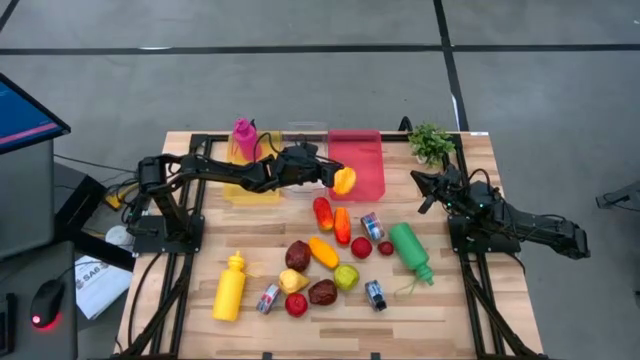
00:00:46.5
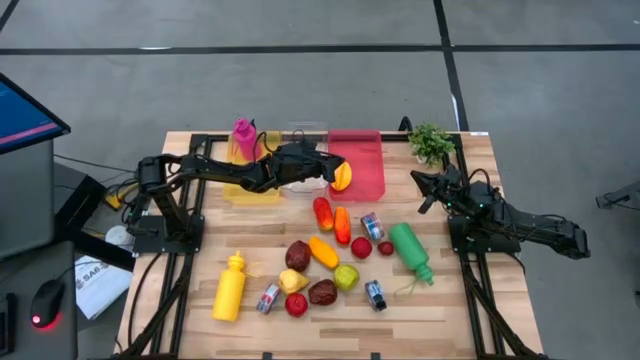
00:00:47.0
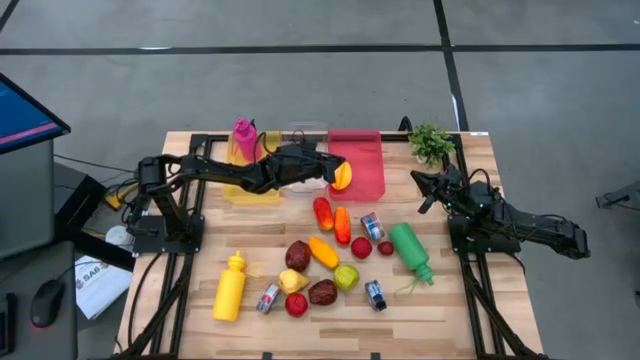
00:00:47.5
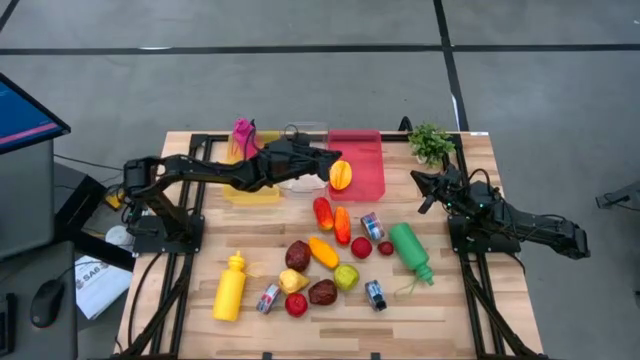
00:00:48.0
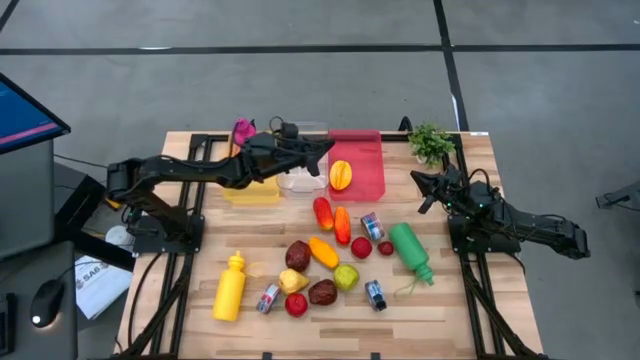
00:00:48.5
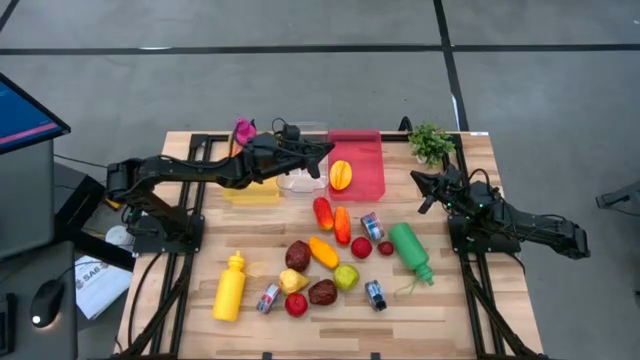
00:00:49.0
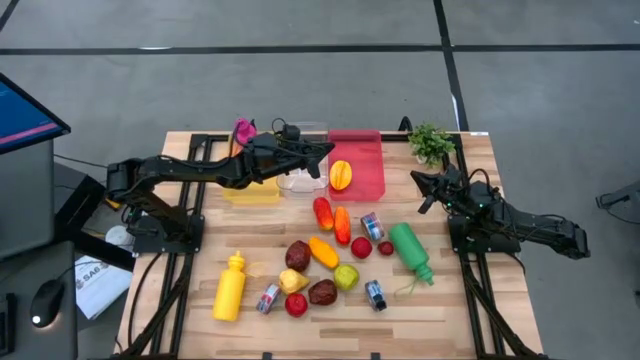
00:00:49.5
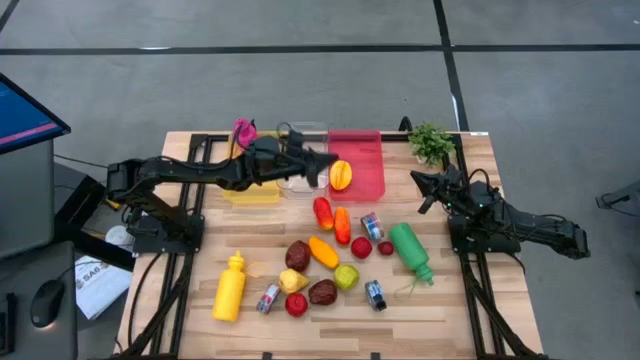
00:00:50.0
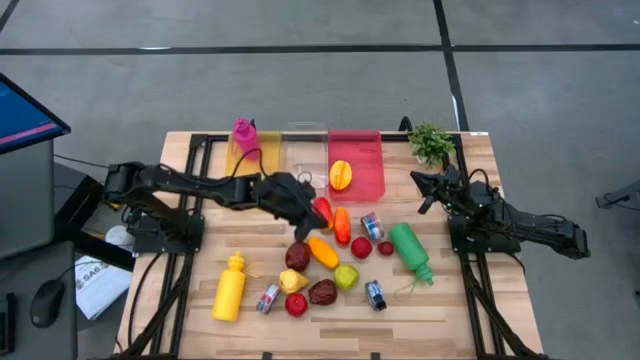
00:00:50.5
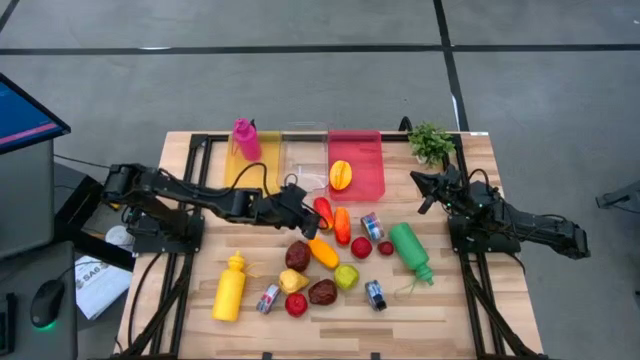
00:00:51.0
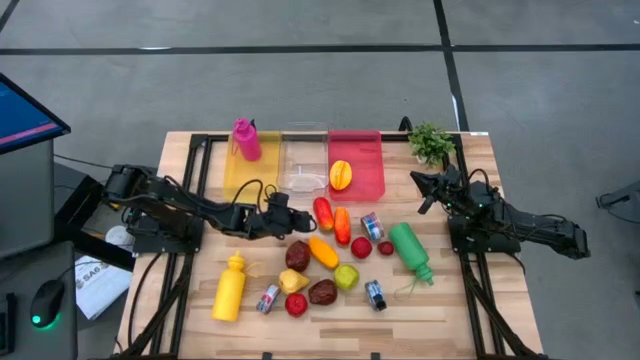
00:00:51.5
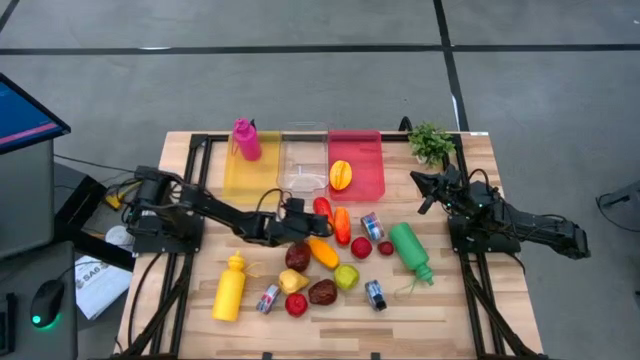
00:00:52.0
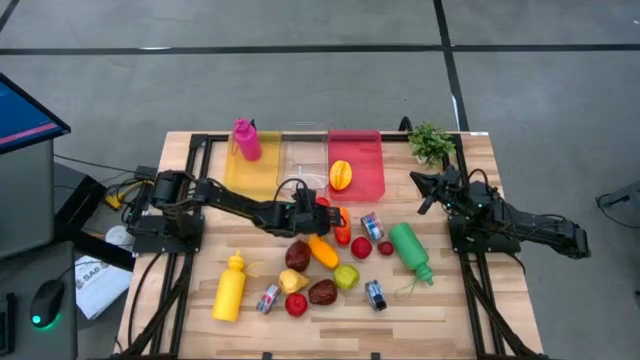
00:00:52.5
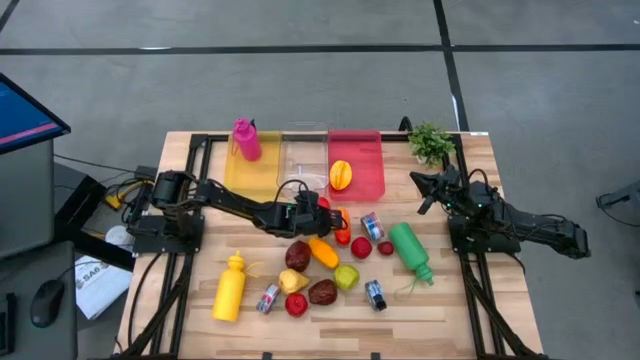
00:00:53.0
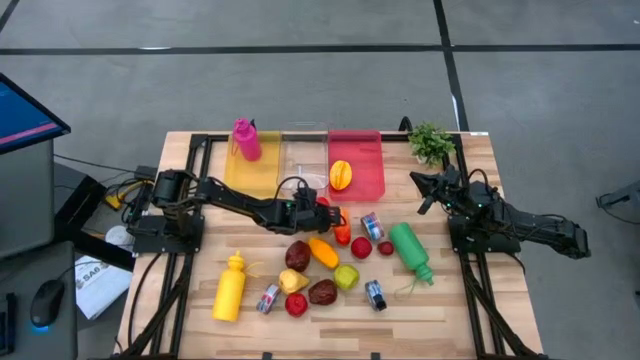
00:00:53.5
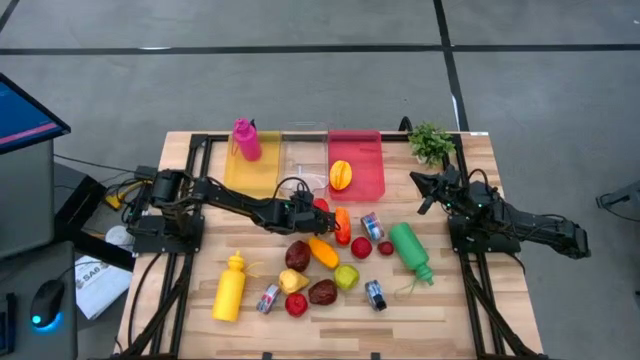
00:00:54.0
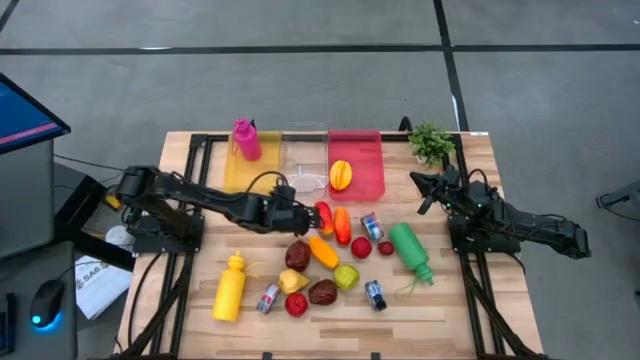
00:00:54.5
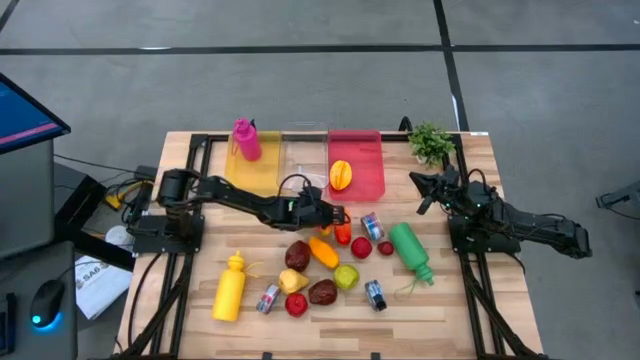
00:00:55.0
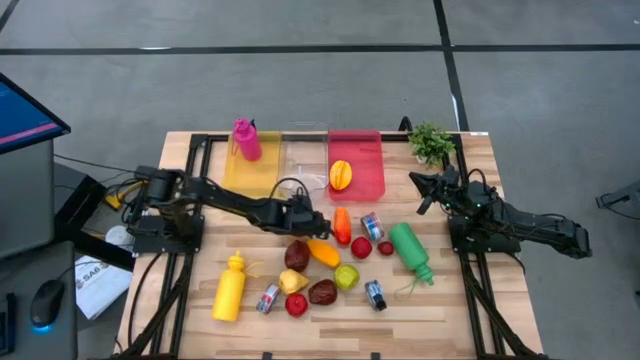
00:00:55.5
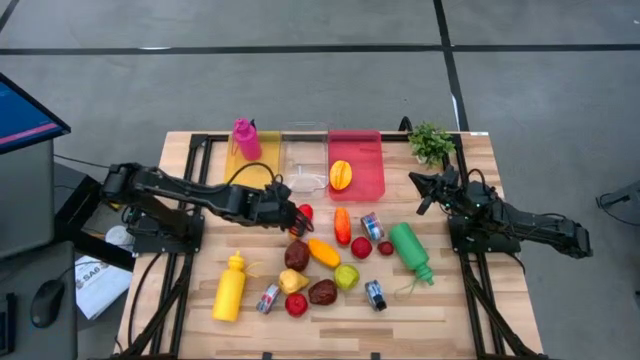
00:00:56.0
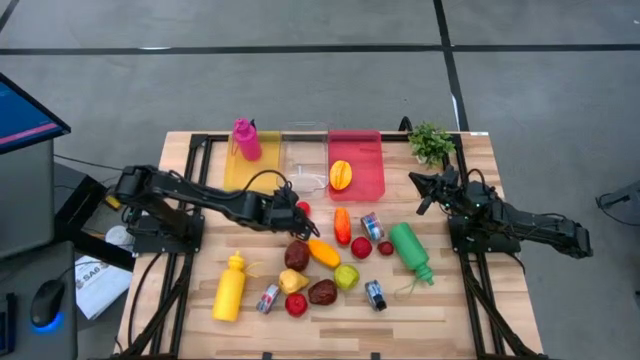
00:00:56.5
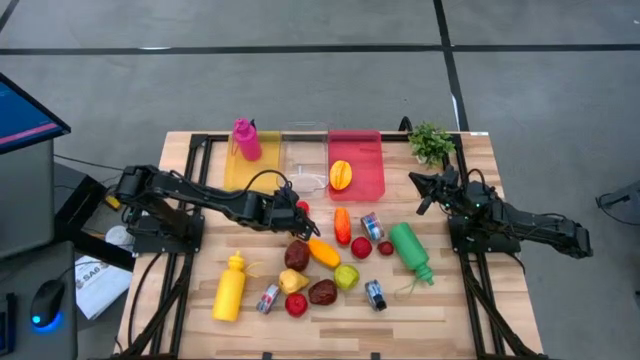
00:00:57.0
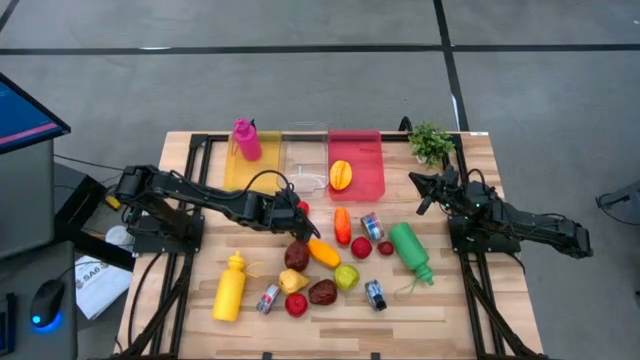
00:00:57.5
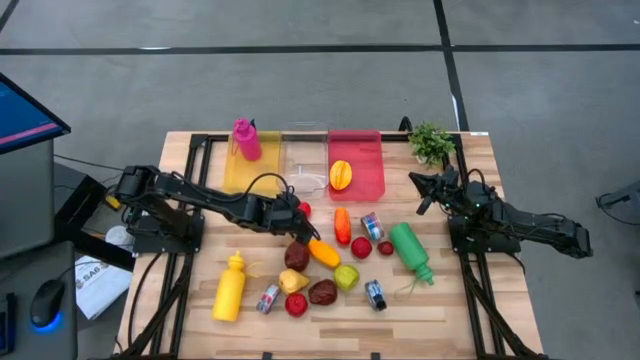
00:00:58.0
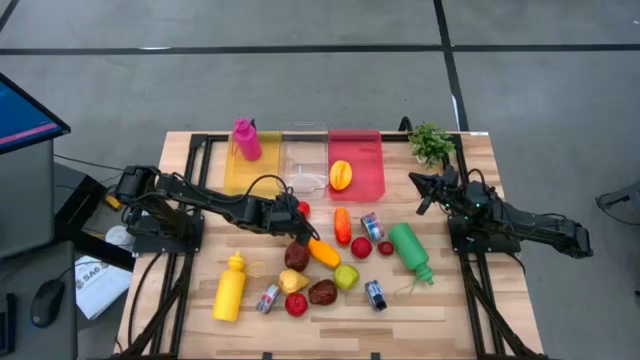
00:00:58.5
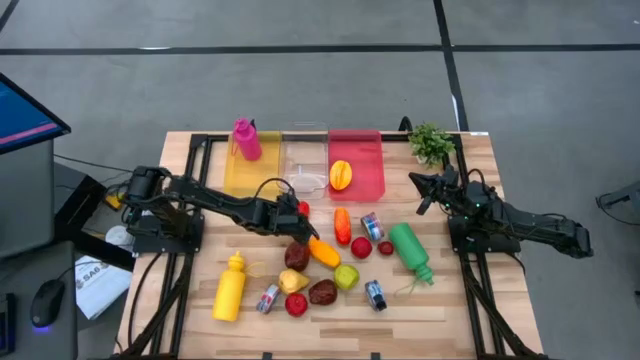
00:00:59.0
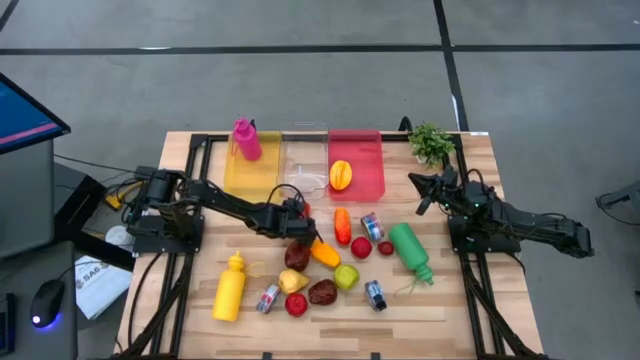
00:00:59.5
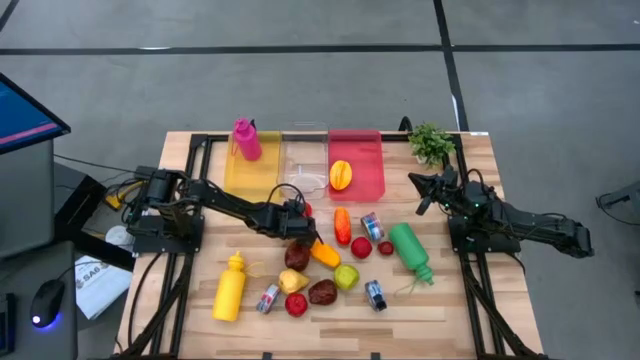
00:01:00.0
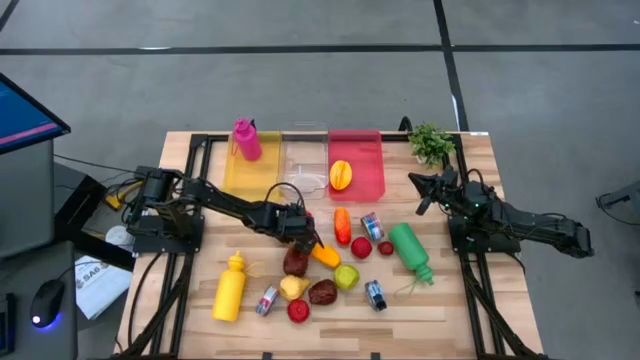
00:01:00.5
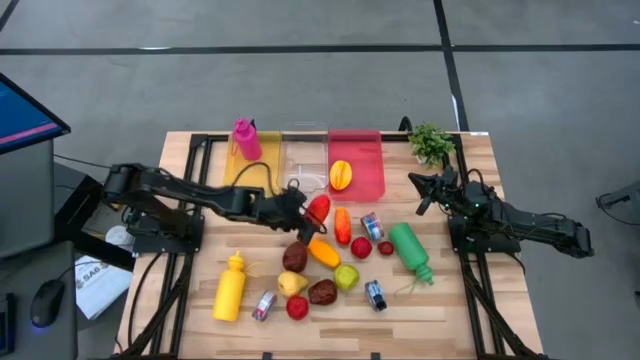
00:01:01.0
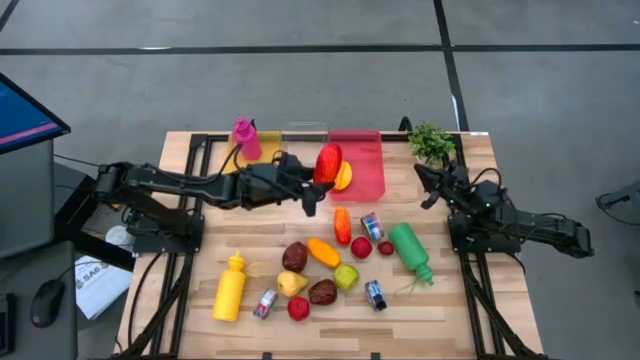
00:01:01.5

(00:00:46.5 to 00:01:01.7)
Task: Pick & Place Food Item
Put the left orange mango into the pink bin

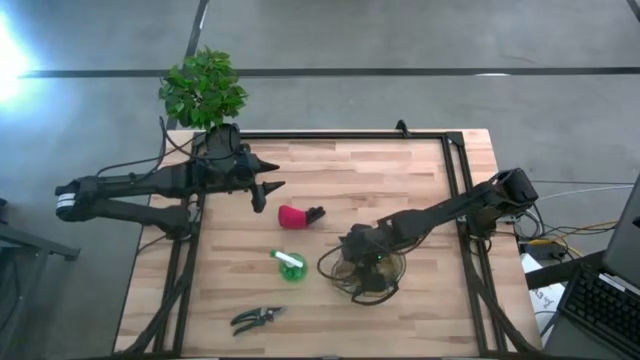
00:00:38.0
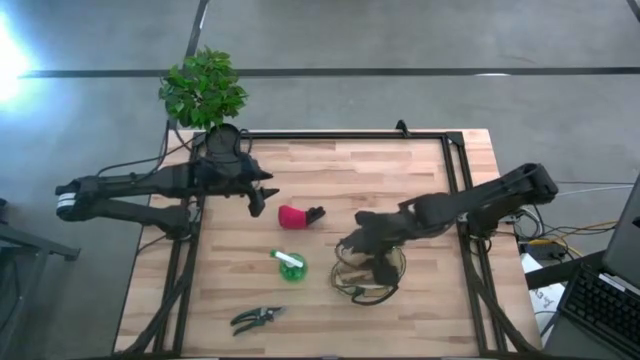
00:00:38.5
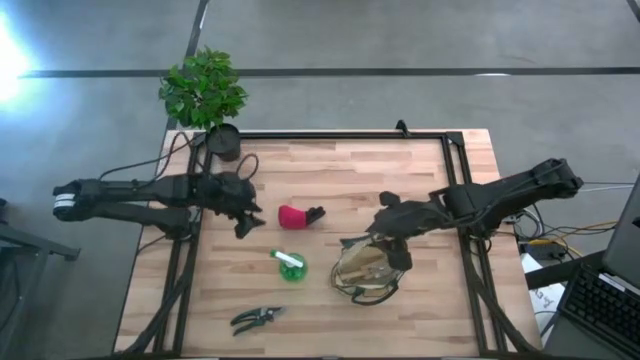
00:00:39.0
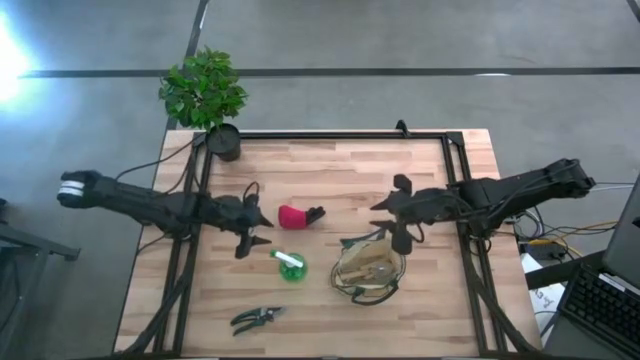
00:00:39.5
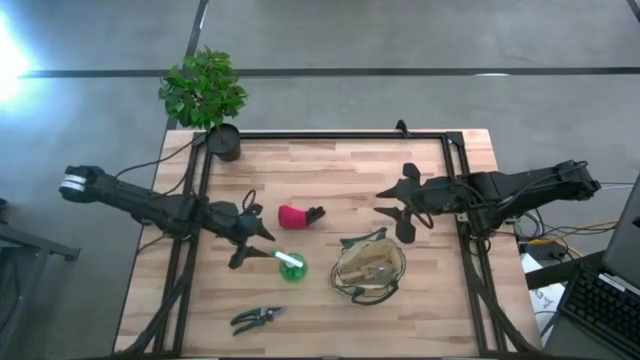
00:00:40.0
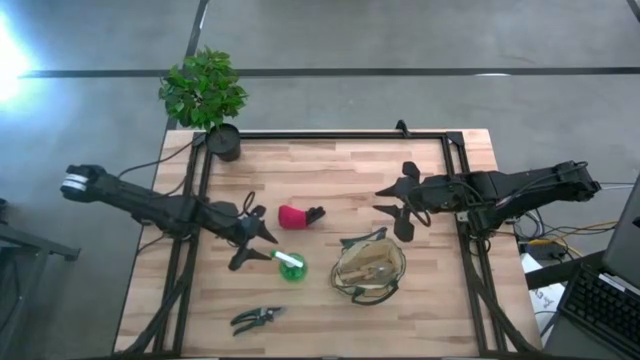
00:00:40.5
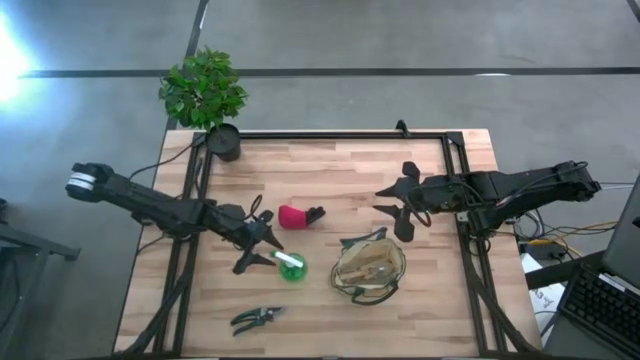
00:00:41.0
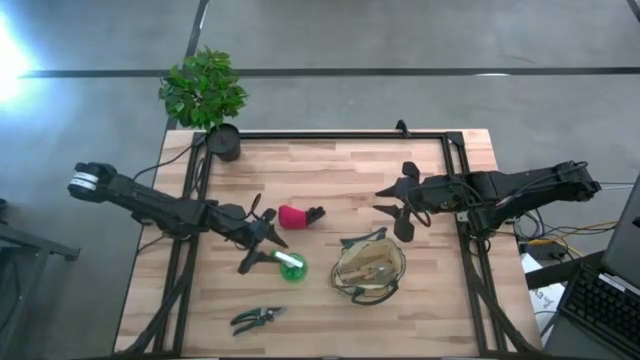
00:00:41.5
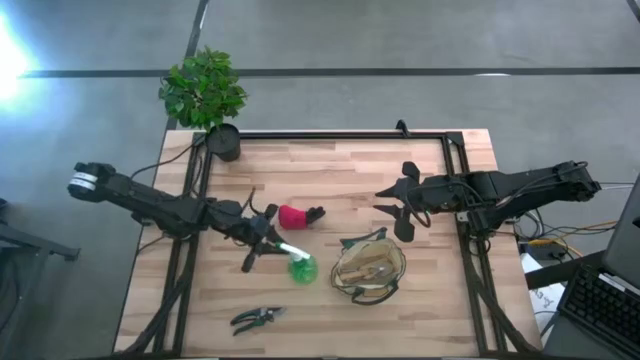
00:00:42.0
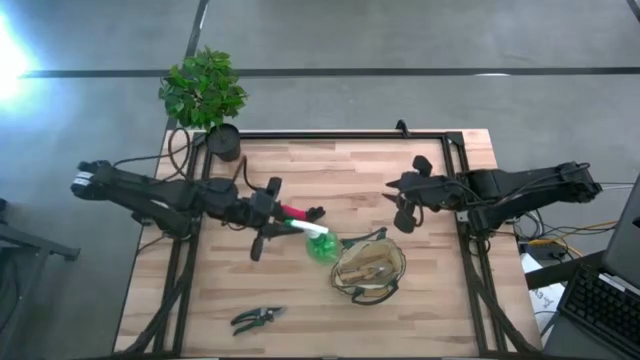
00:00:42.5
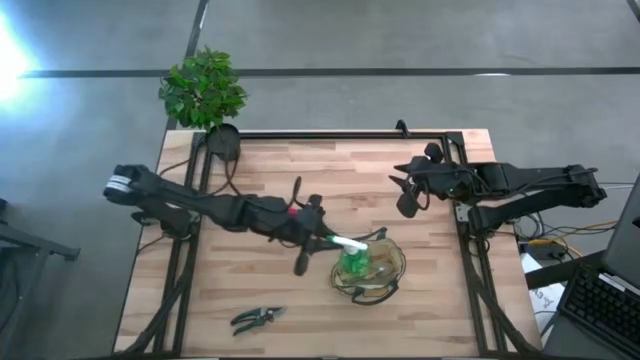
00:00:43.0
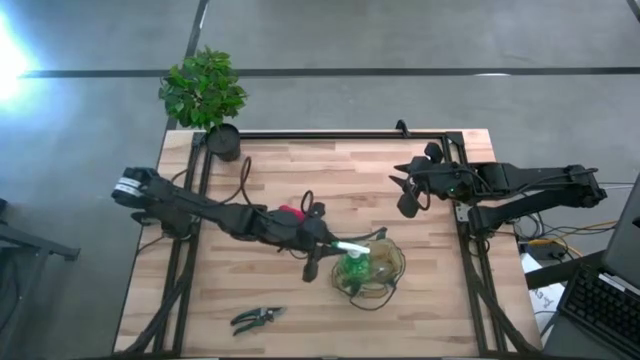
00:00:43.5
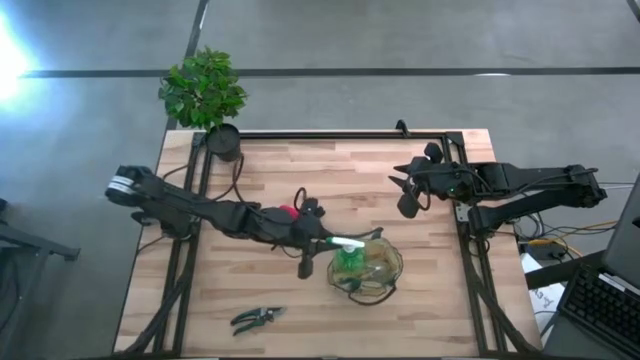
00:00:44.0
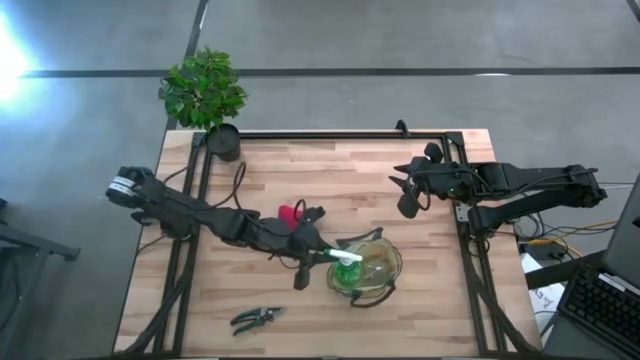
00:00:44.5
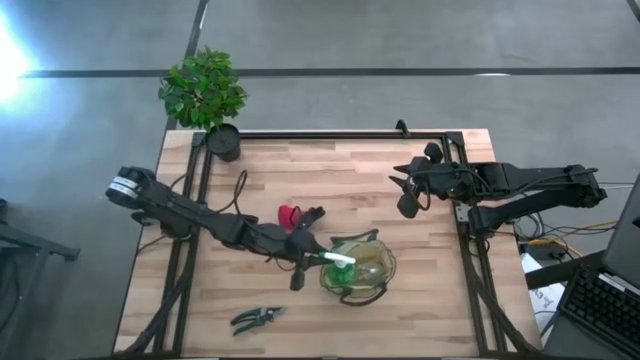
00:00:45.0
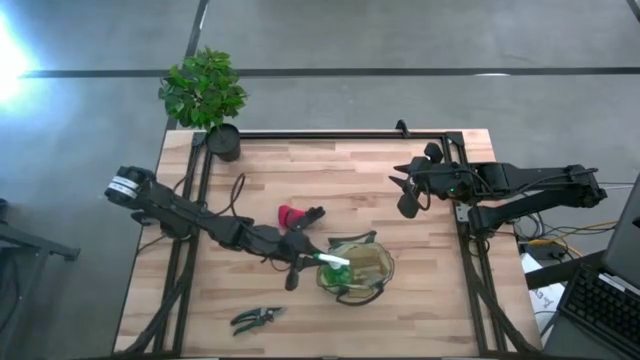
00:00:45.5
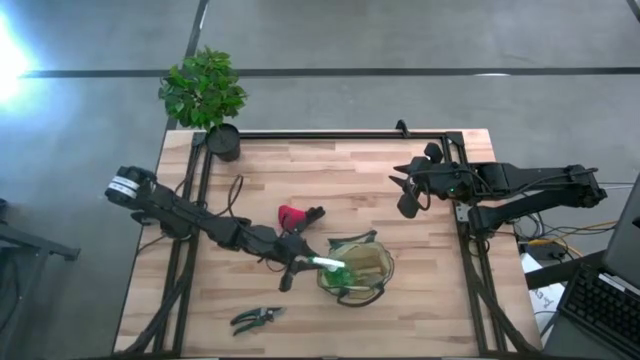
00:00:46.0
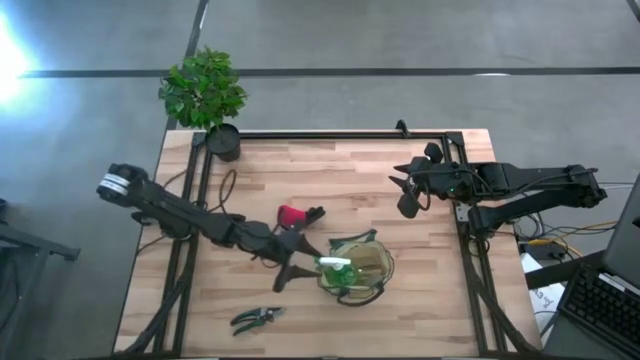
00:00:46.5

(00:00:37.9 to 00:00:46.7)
Task: Pick & Place Garden tools in Gardening bag
Put the green spray bottle into the gardening bag
